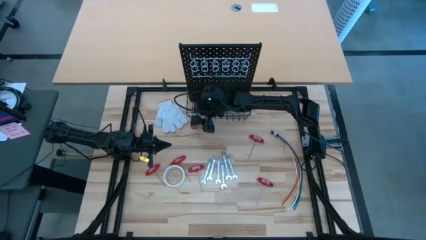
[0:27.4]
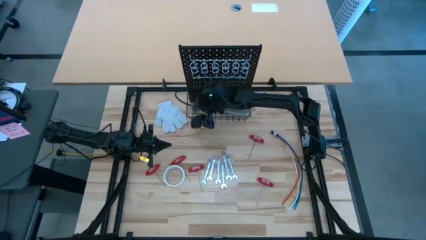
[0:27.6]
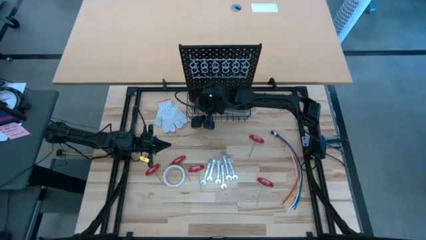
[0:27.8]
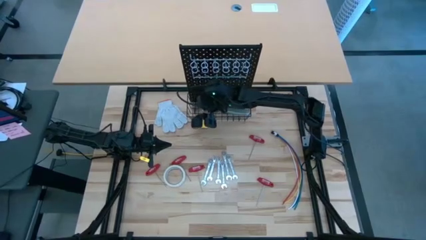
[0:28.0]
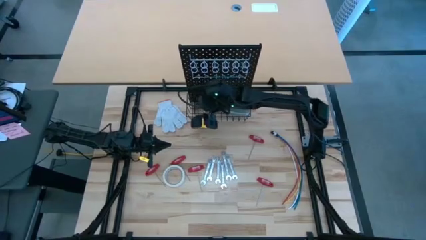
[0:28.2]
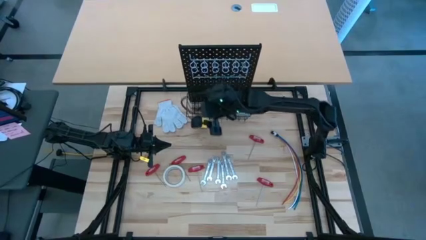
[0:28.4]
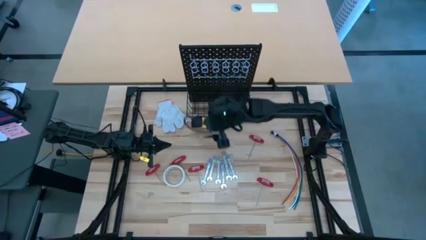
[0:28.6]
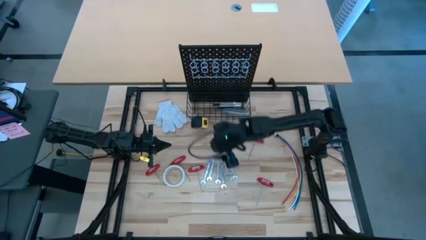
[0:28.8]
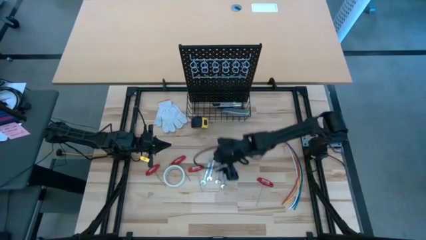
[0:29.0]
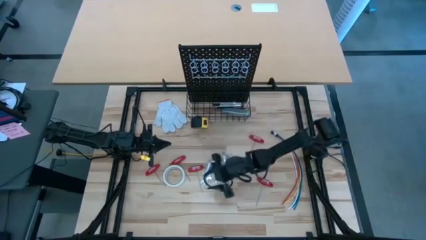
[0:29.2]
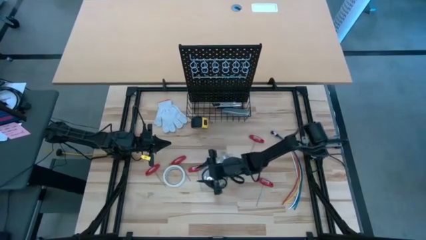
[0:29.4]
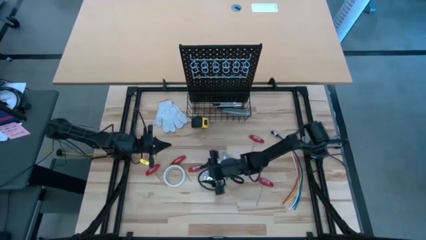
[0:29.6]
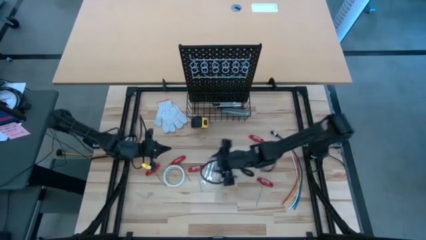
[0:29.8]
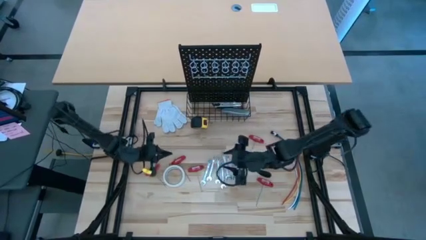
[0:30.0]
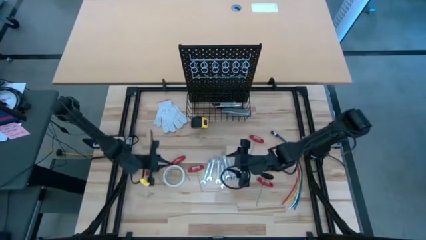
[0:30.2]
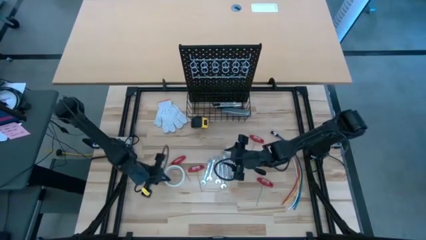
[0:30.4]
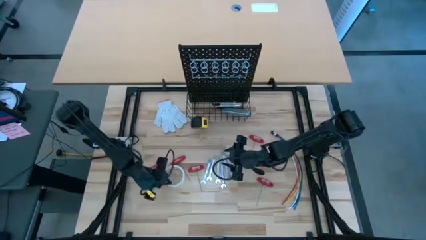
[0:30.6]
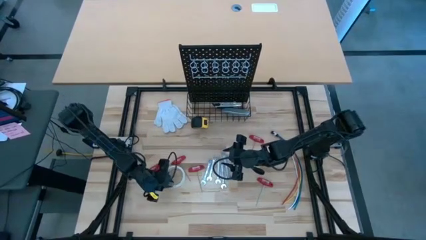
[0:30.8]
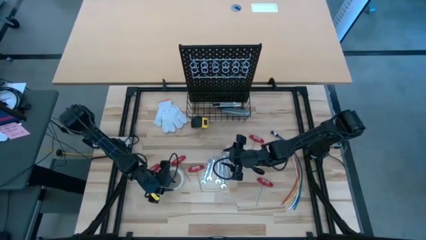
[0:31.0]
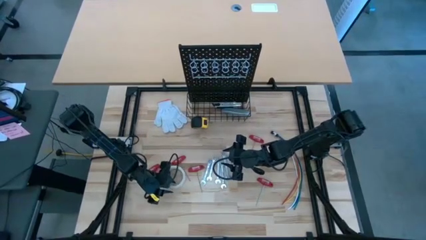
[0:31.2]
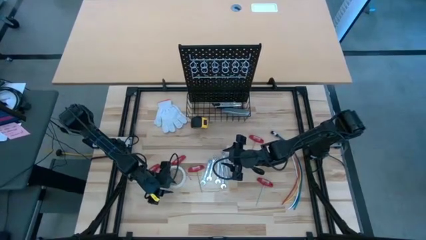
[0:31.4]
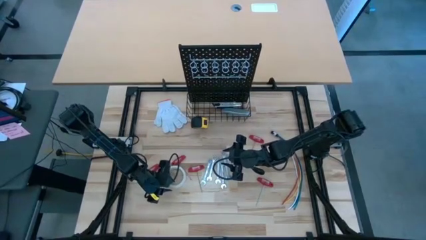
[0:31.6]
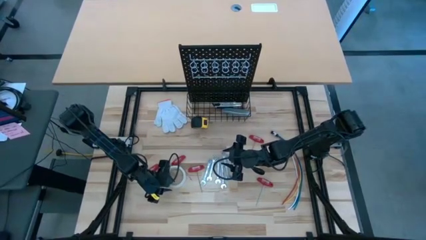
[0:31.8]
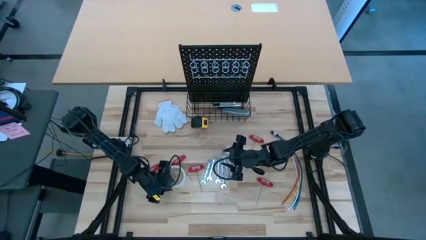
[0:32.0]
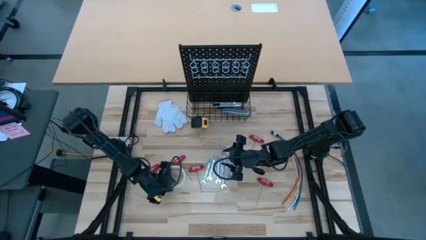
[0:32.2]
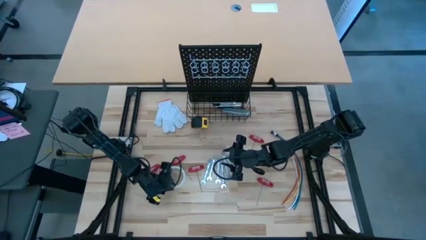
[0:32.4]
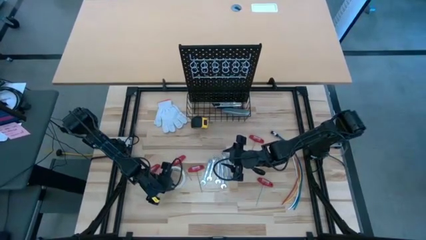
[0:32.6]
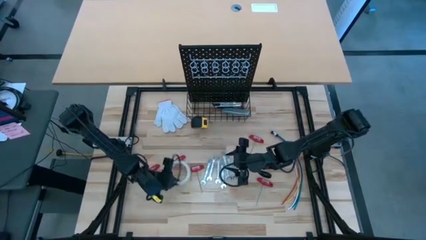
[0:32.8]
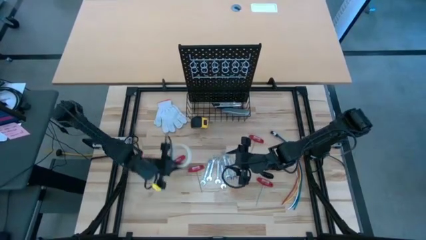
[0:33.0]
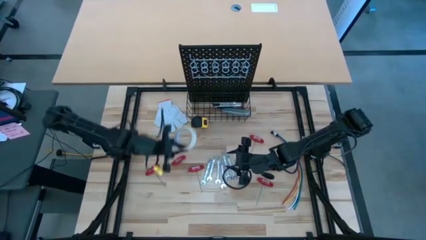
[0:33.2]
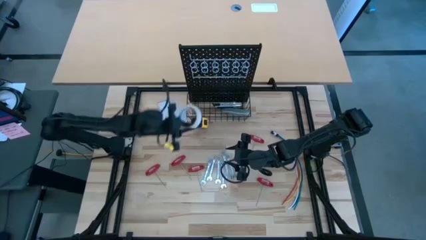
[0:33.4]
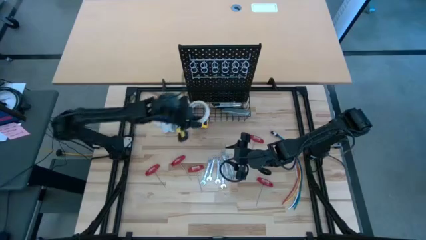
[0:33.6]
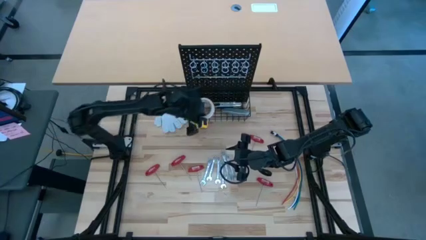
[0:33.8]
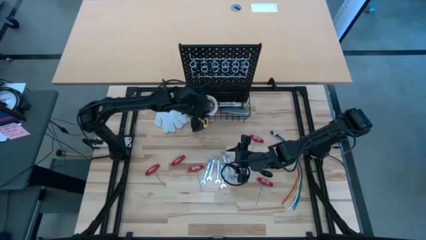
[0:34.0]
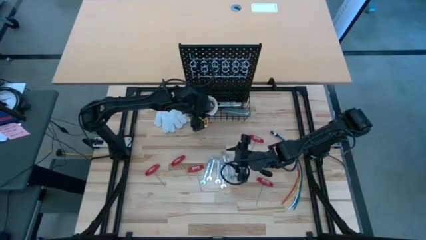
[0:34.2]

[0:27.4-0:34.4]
Task: Hang tools onto peg board
Put the white masking tape into the wire basket on the pegboard

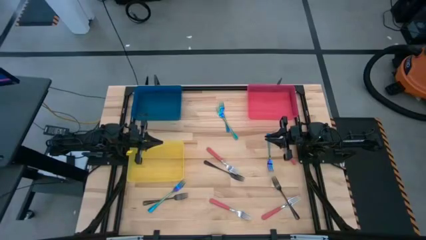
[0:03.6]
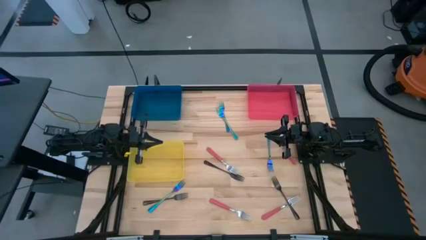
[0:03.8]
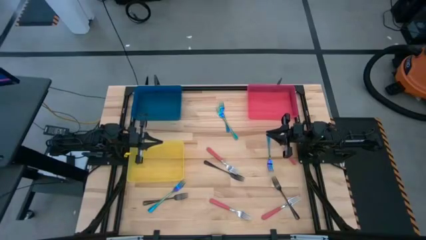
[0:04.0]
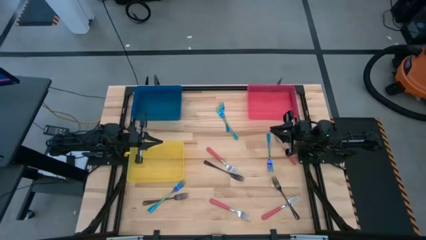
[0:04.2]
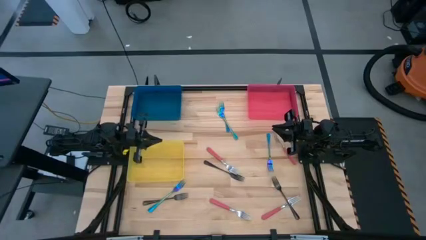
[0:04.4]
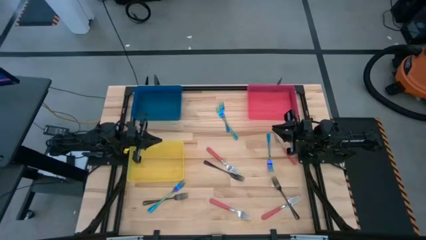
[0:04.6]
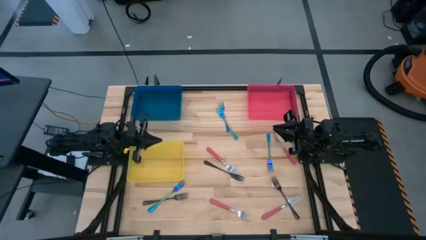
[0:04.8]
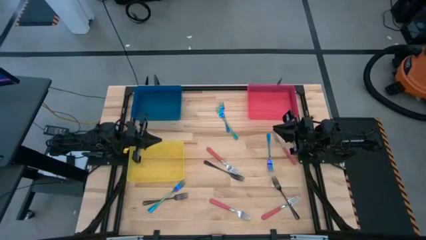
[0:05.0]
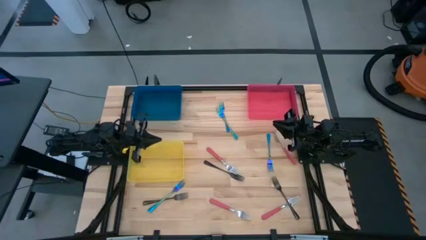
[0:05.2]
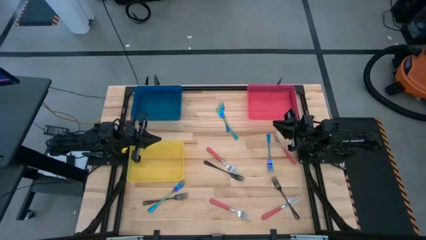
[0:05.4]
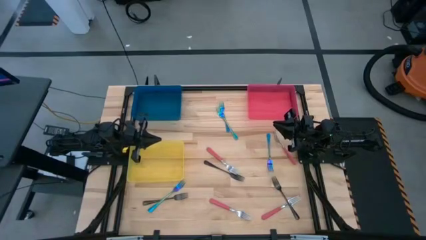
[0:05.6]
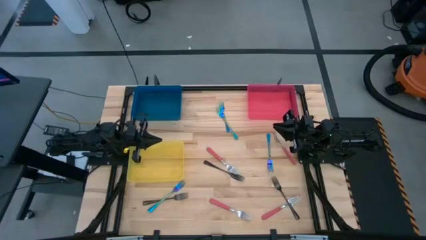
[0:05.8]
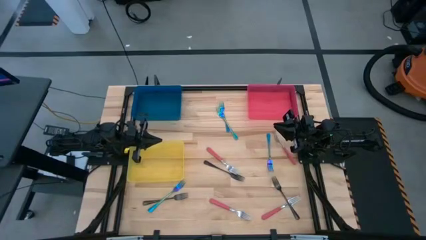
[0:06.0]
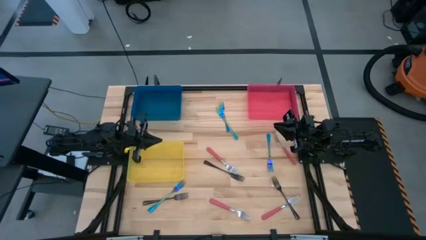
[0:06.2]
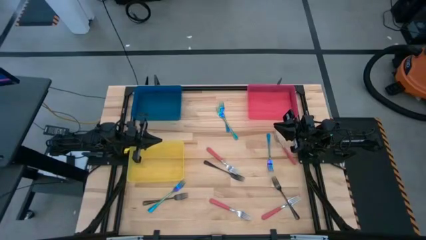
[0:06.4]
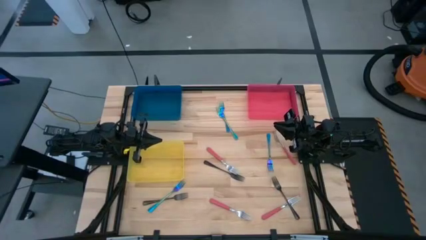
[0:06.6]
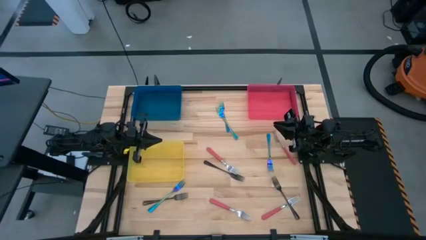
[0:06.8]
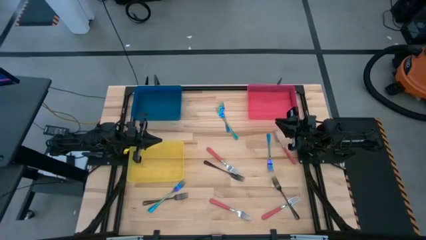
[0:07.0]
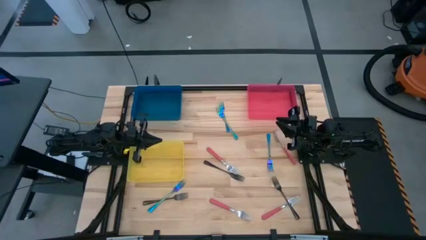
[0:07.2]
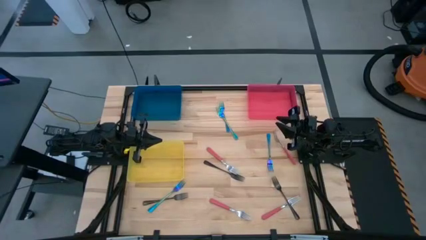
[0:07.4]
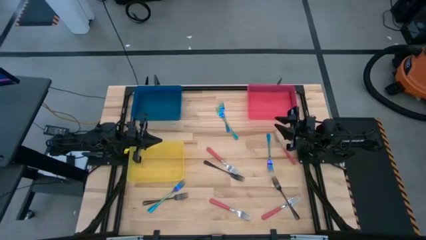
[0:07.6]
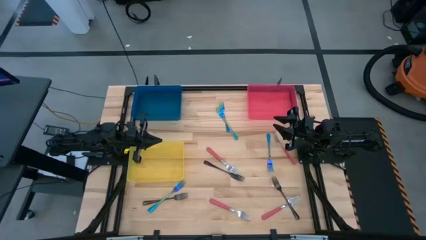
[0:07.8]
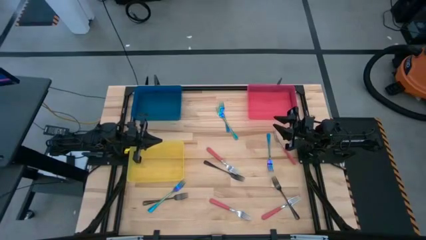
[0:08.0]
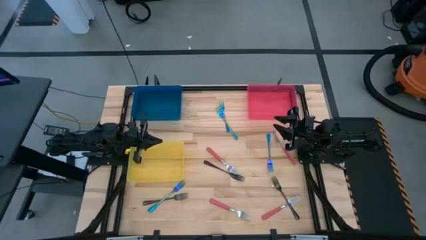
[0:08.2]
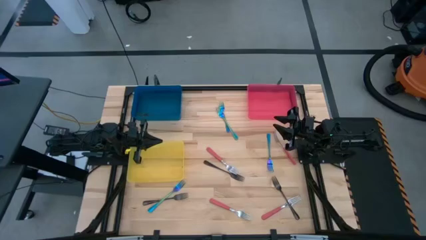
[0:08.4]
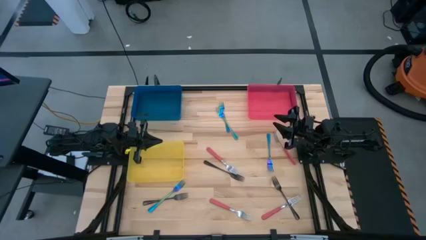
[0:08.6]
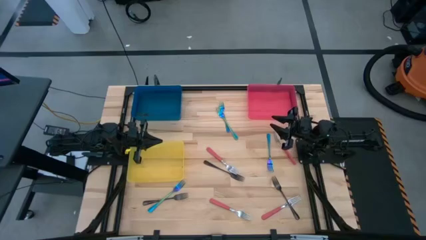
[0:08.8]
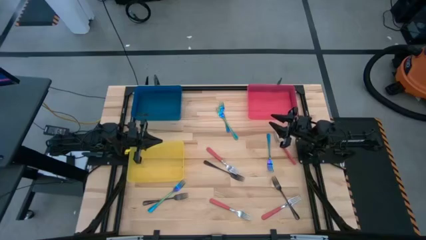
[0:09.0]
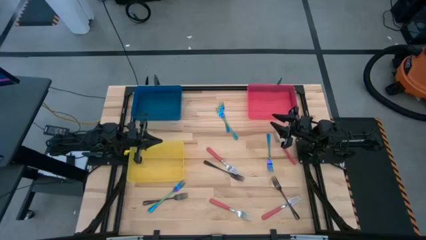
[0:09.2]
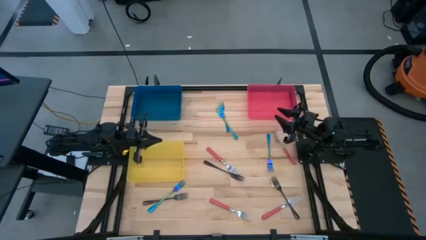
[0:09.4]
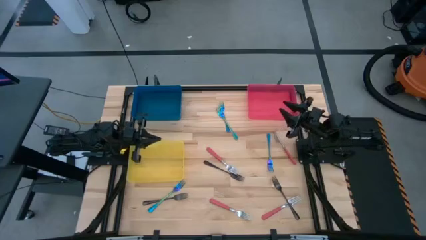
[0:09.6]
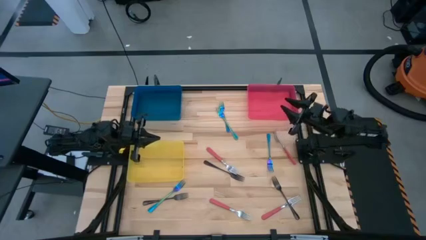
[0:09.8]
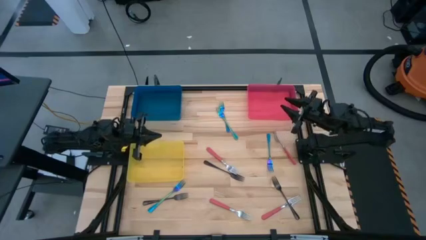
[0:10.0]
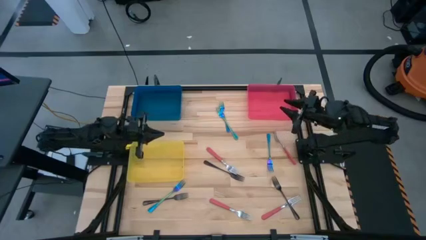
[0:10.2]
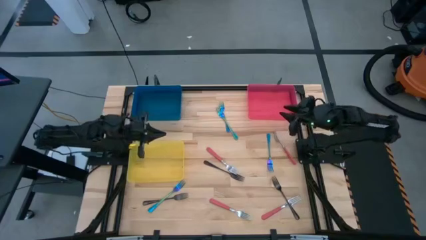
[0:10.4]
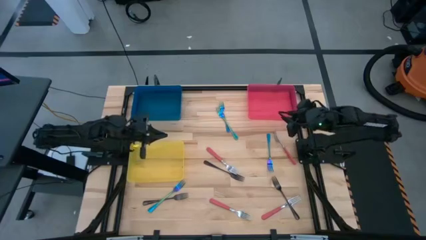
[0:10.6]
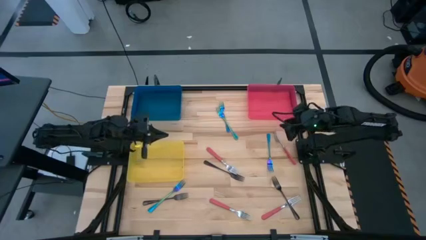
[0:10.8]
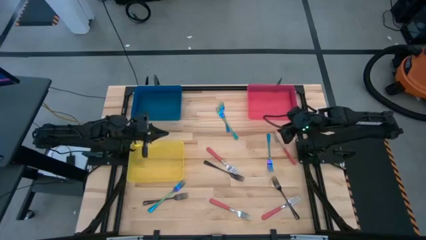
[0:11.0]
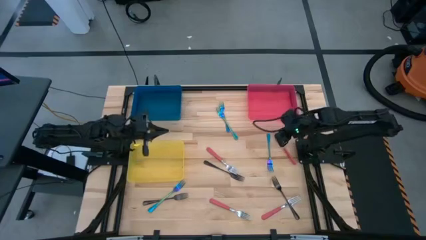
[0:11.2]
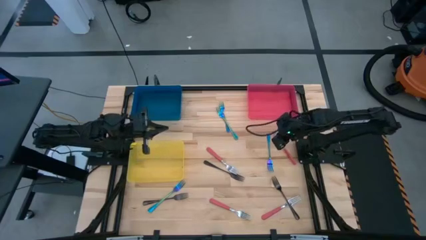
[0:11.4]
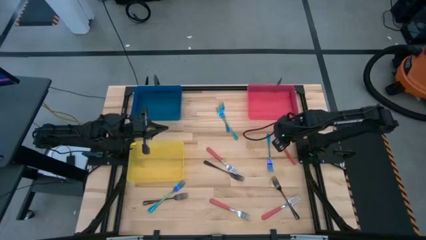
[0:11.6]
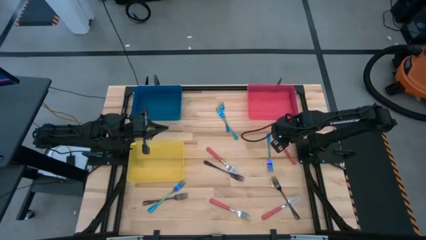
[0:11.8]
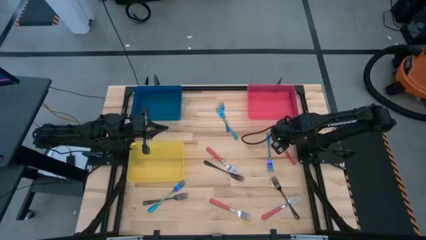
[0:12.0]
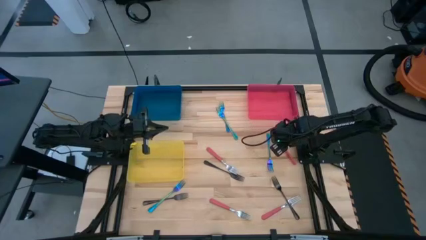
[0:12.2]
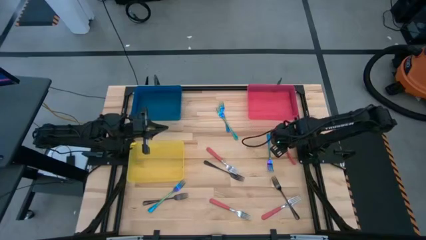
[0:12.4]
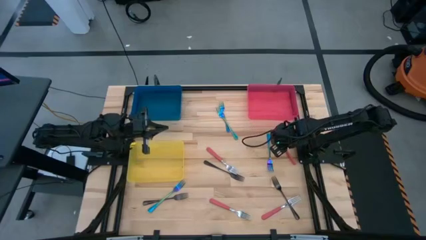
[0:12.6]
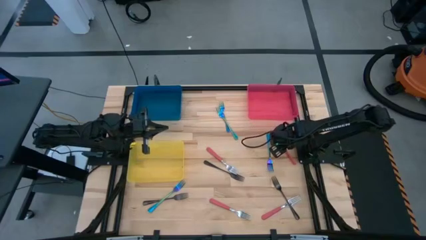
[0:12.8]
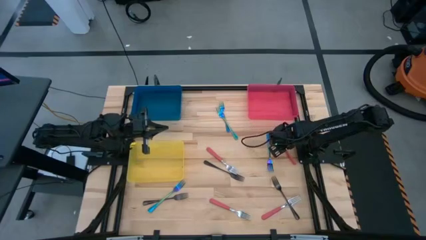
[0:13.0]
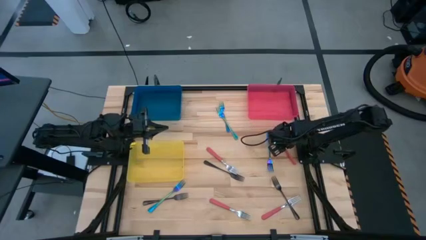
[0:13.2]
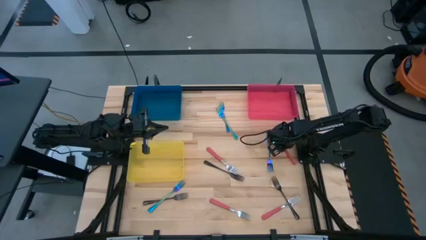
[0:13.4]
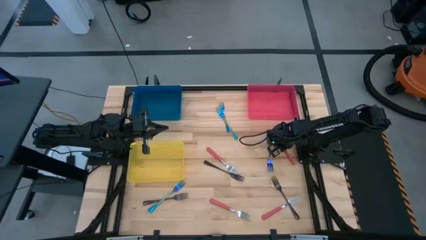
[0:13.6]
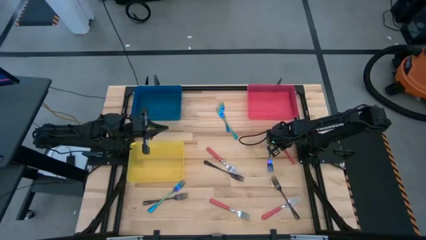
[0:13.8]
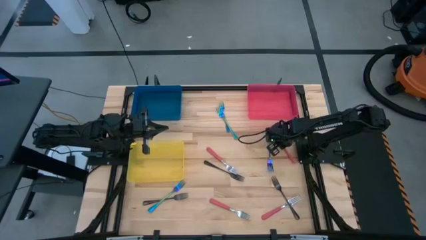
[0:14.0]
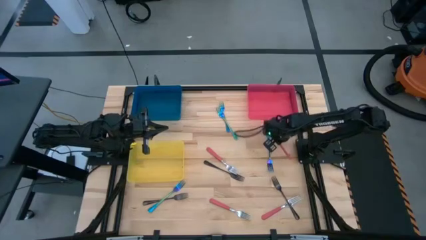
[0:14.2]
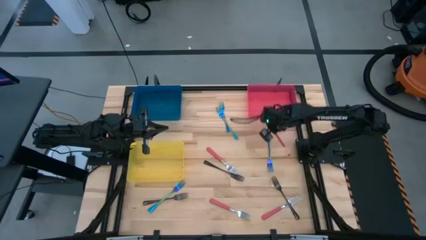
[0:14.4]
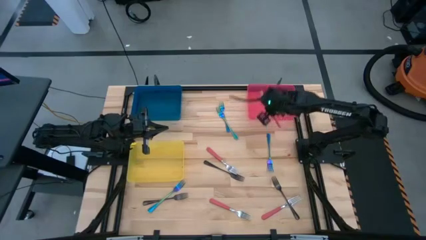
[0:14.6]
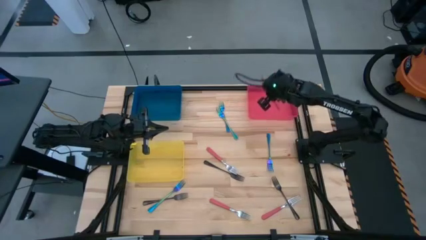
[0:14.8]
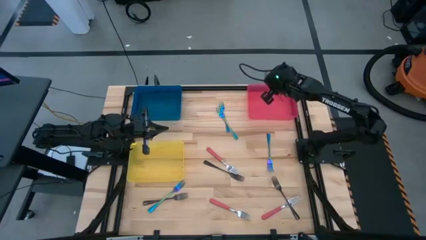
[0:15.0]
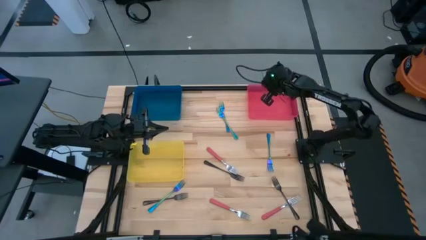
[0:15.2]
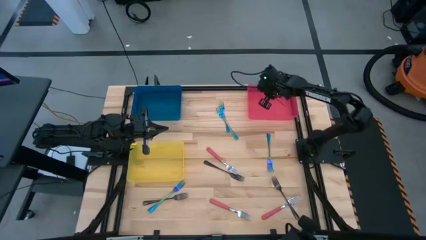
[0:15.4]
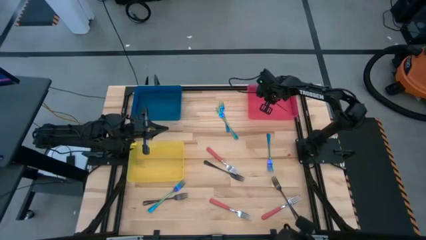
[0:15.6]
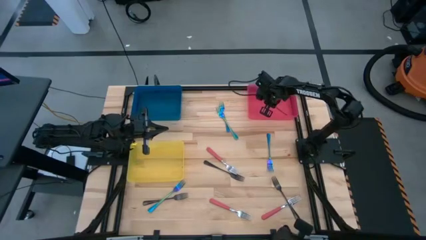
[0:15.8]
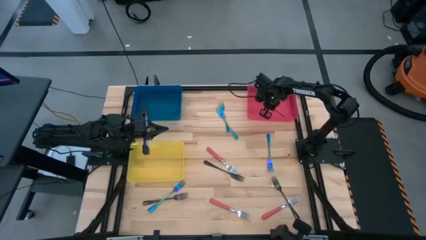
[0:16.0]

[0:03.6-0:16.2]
Task: Sort silverware by color (type)
Put the pink fork into the red bin
